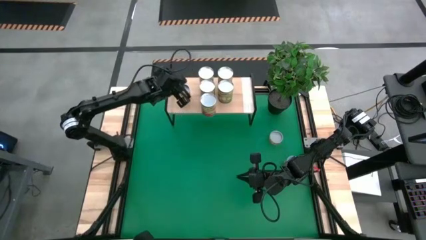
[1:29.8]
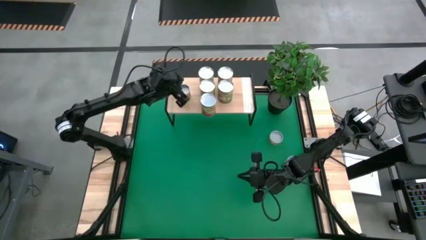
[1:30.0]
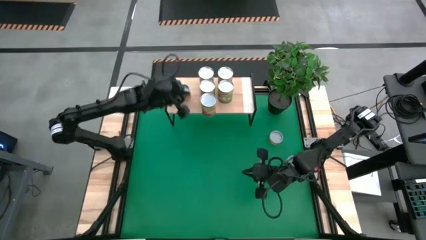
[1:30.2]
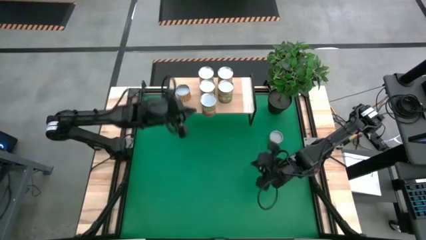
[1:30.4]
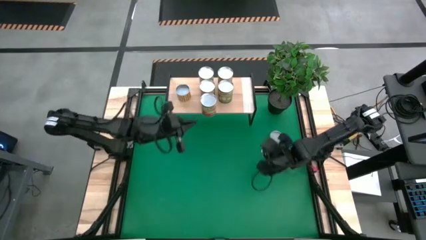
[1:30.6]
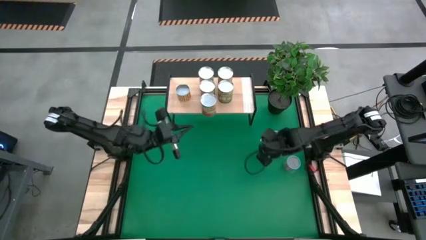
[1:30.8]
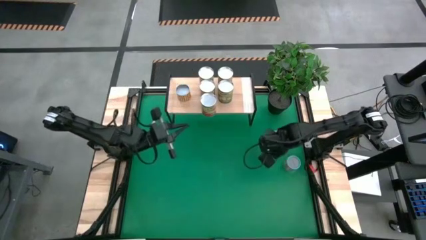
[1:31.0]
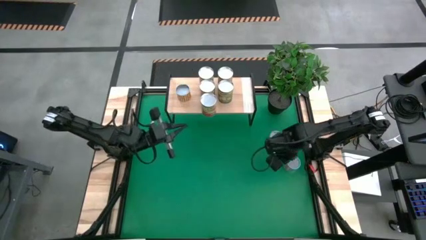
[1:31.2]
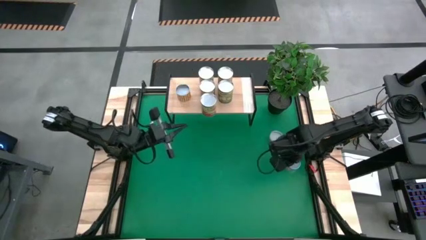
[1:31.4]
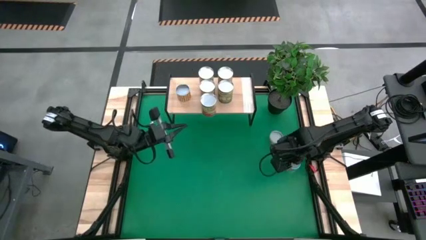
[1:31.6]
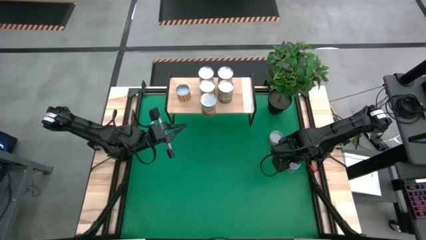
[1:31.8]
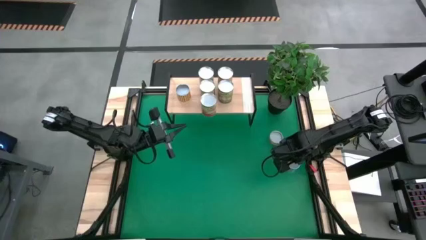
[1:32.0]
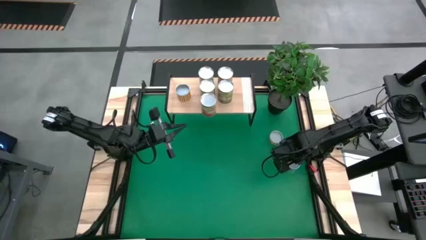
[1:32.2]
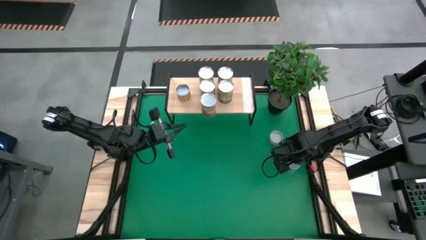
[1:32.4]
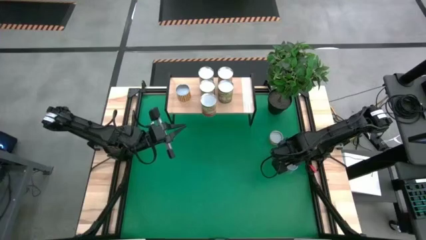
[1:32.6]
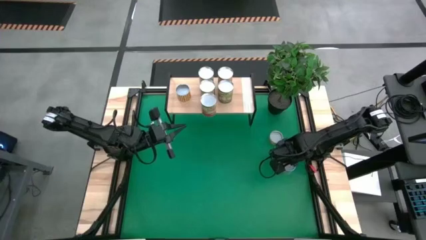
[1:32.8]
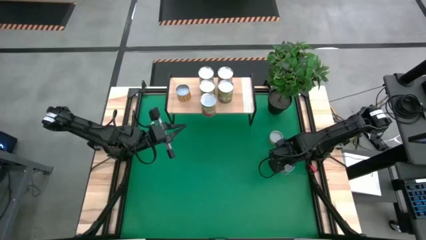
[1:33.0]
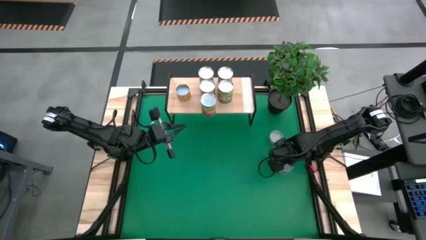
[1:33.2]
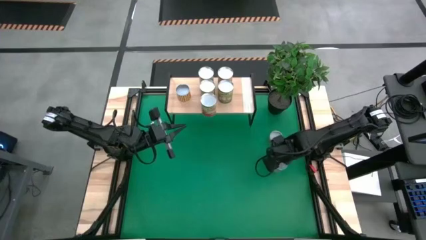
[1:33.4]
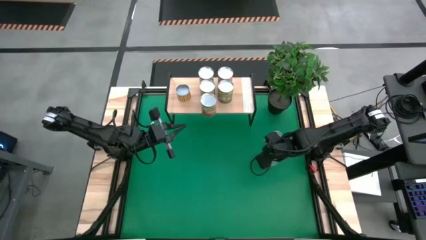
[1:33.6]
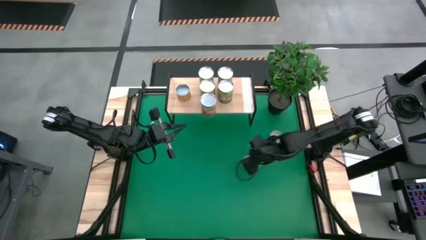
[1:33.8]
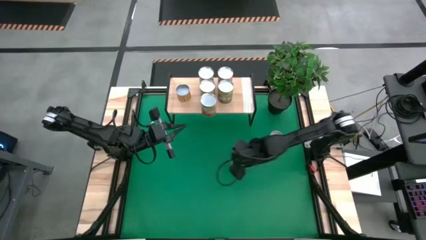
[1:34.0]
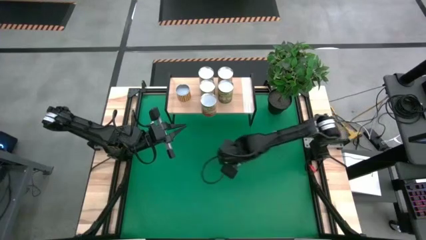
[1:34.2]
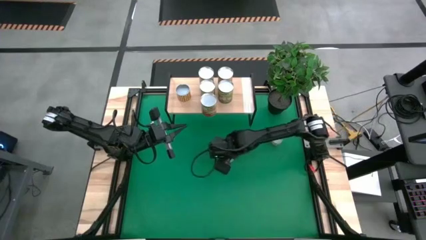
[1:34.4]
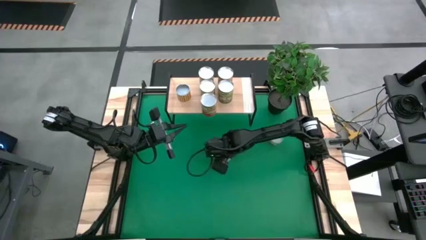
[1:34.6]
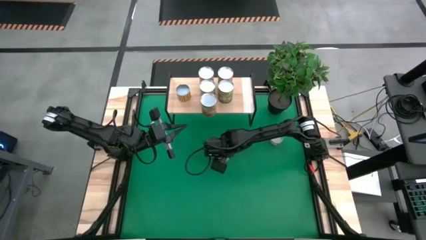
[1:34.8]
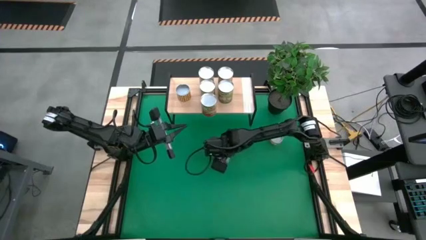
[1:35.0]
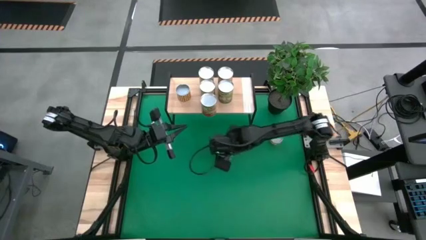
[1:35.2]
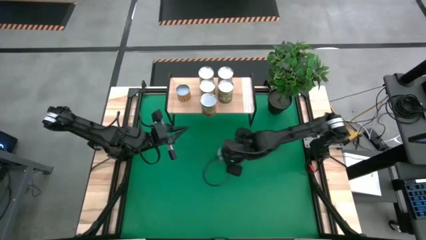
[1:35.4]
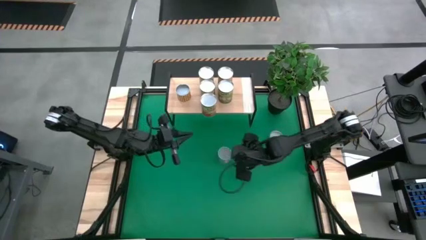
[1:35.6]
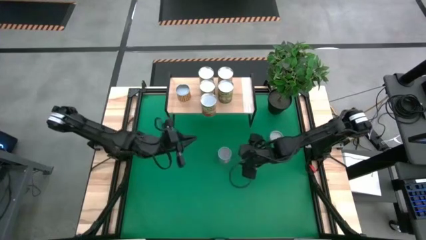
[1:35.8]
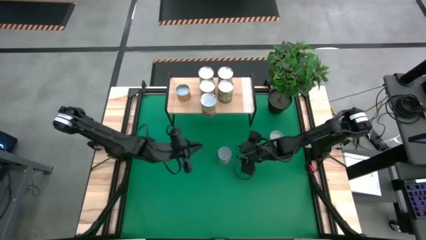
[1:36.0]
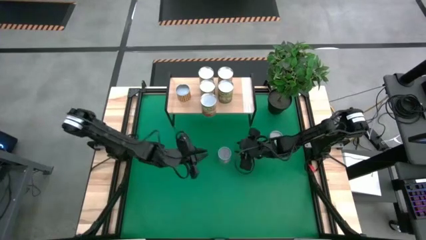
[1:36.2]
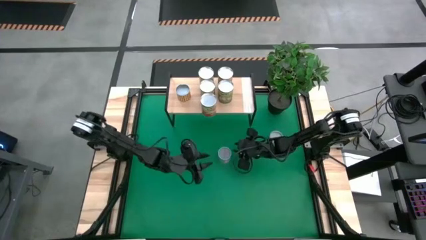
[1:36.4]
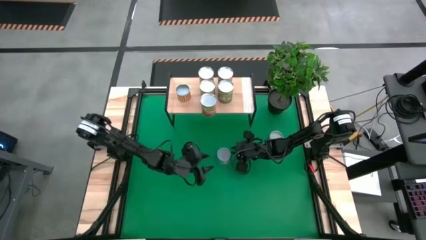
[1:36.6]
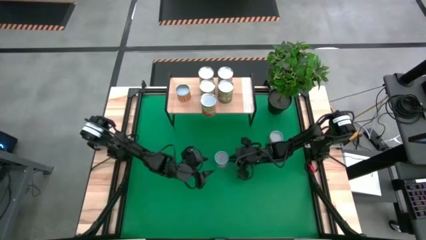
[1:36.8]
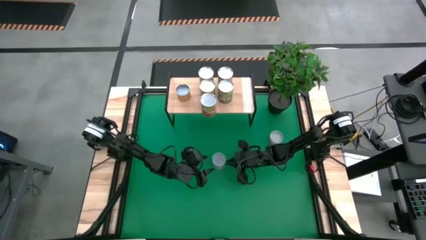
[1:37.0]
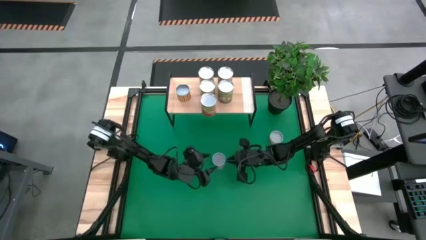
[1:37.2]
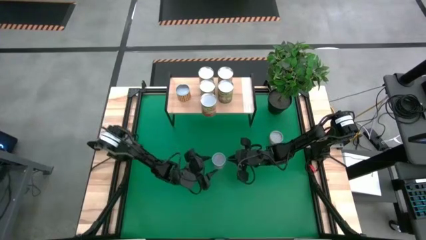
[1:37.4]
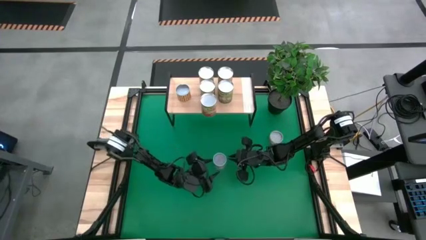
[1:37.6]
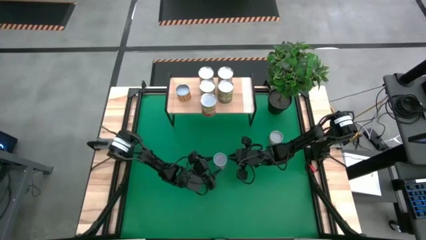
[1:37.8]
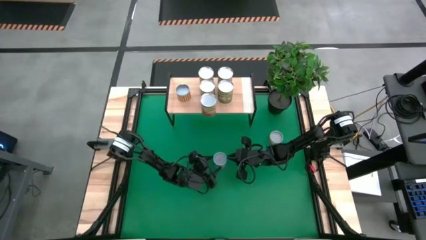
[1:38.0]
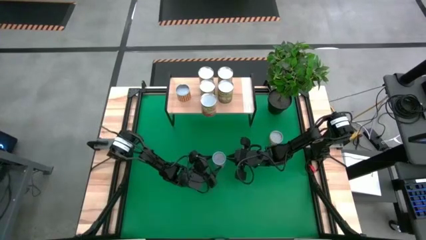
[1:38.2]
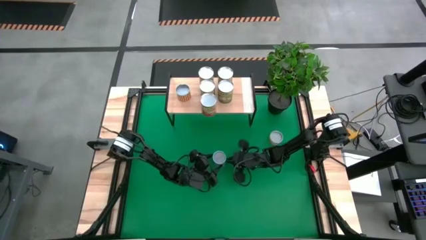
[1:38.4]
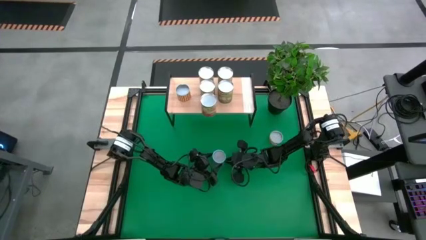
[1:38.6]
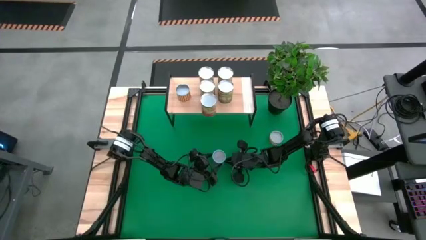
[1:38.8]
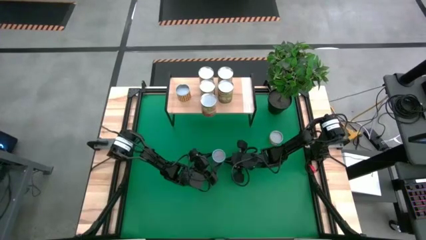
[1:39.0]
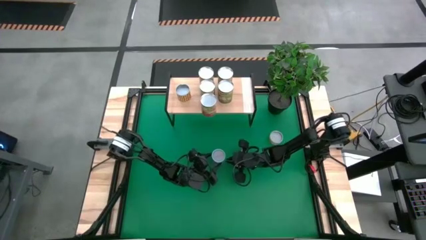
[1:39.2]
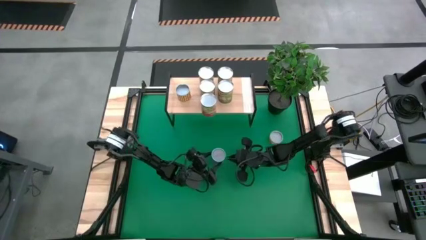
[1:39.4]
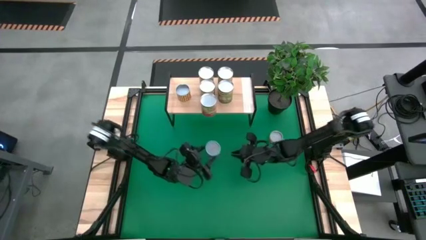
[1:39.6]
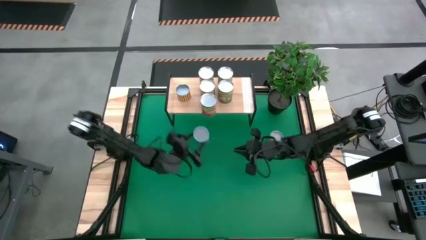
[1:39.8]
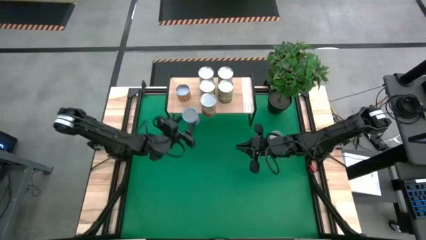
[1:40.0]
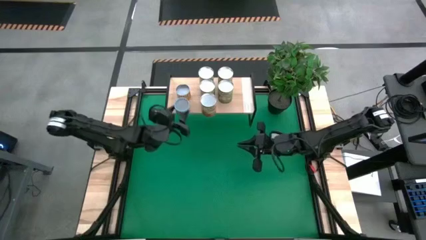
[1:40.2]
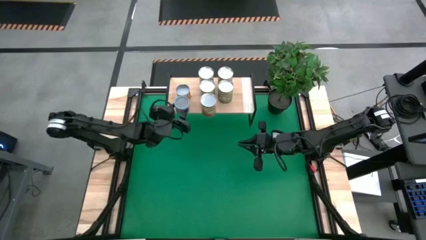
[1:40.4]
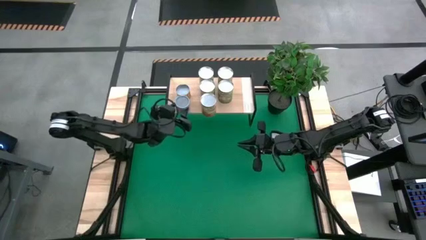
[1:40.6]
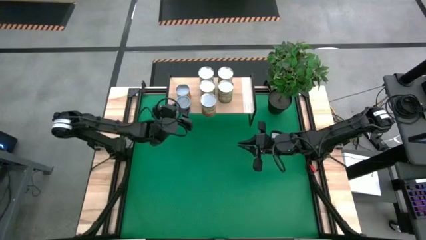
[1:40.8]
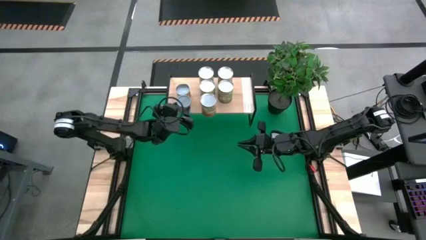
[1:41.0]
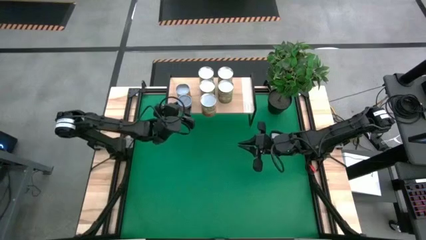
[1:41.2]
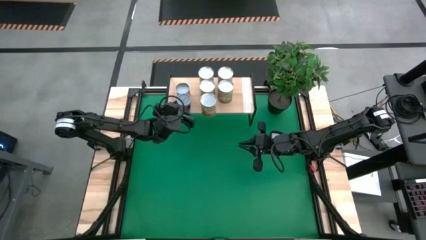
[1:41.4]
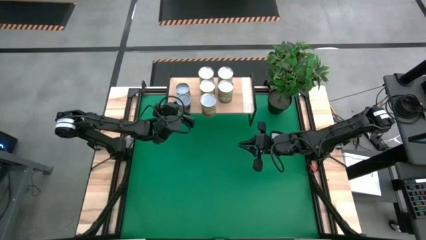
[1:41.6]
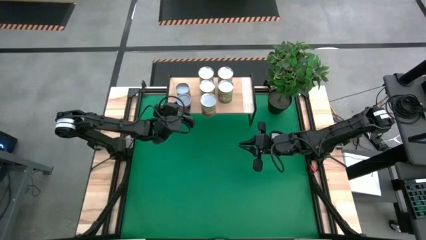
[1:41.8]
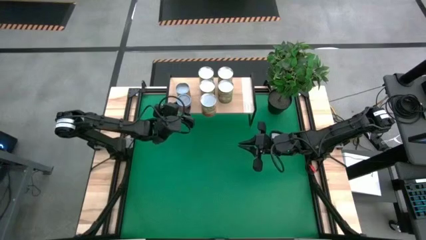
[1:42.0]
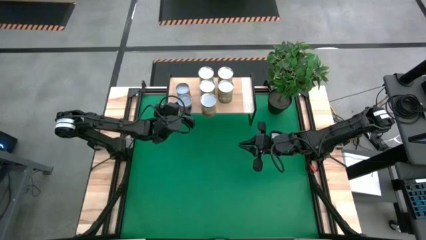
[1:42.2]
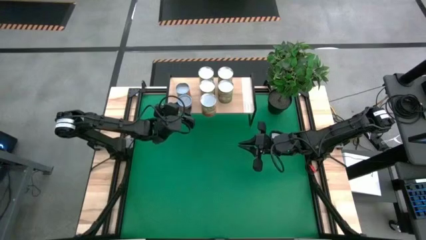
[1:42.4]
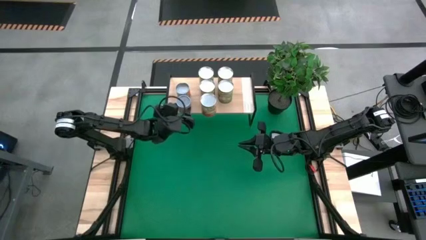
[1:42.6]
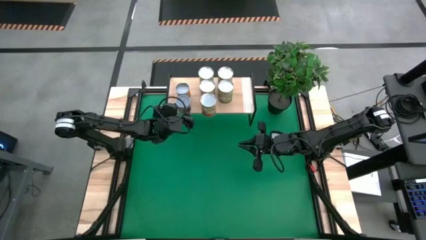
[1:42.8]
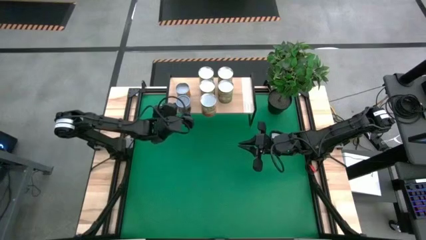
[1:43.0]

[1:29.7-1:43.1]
Task: Pick and place cans onto a shelf
Put the blue canned corn on the shelf
